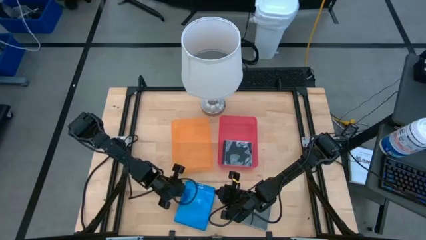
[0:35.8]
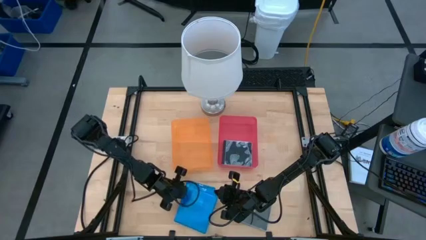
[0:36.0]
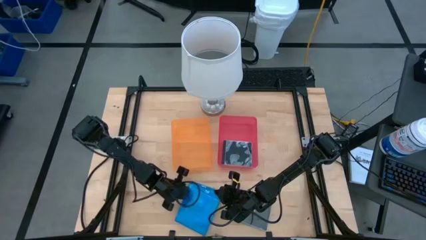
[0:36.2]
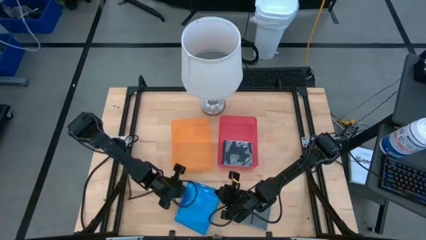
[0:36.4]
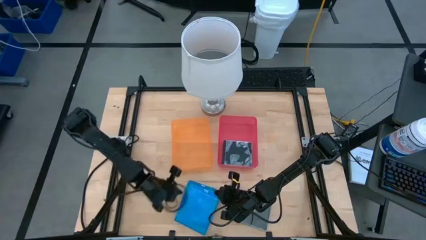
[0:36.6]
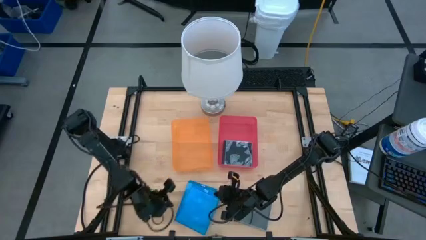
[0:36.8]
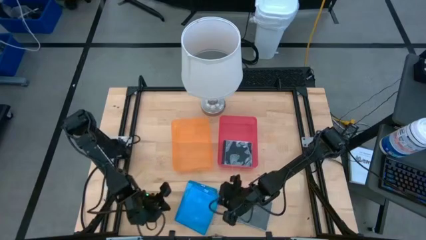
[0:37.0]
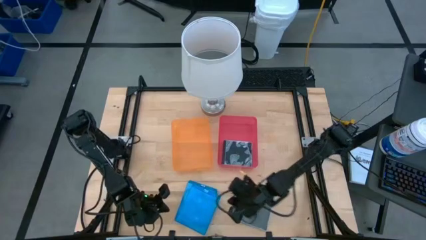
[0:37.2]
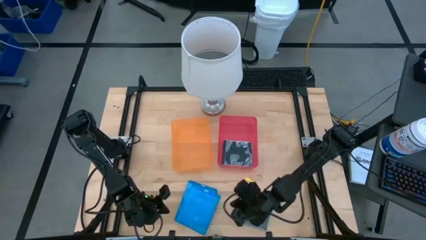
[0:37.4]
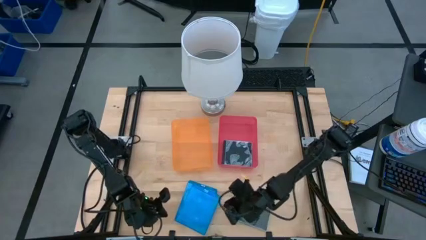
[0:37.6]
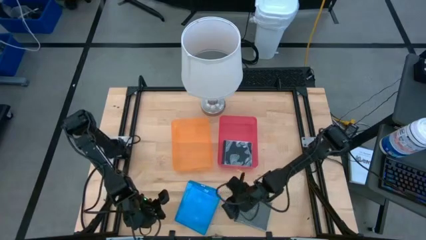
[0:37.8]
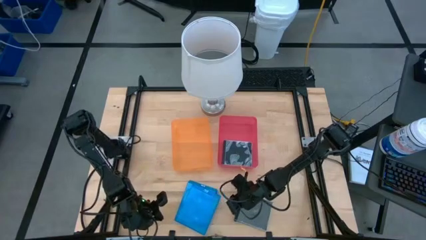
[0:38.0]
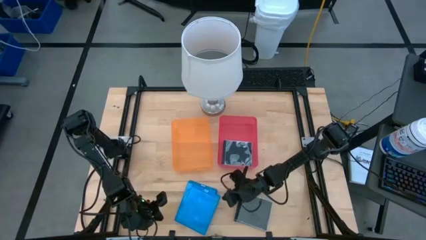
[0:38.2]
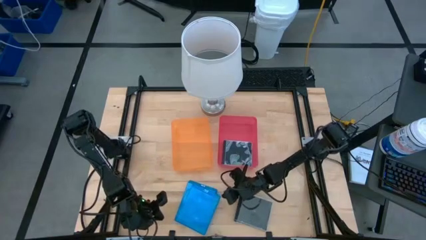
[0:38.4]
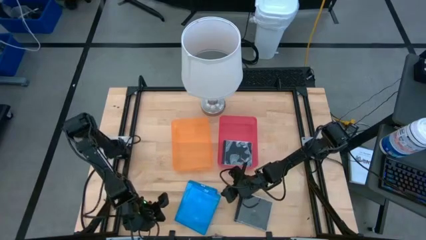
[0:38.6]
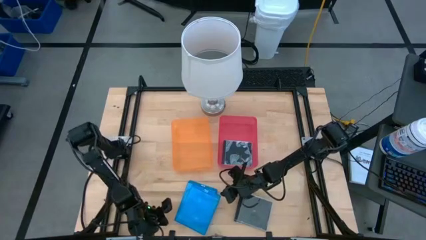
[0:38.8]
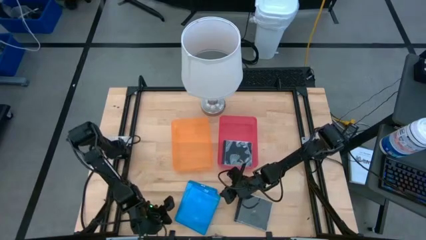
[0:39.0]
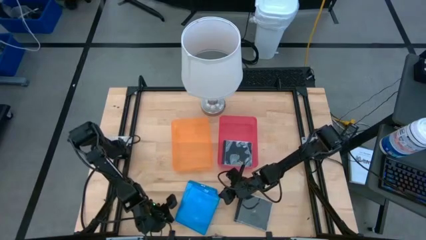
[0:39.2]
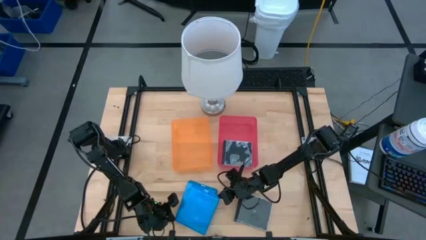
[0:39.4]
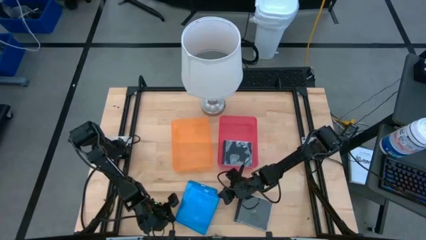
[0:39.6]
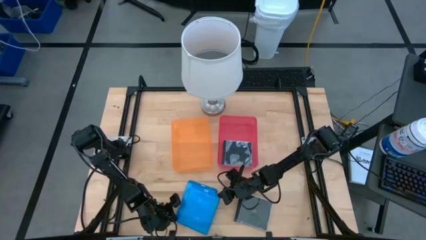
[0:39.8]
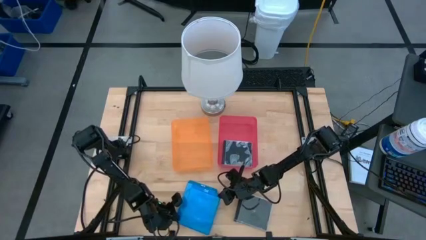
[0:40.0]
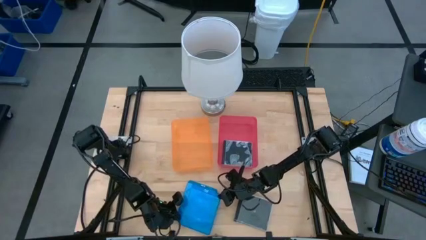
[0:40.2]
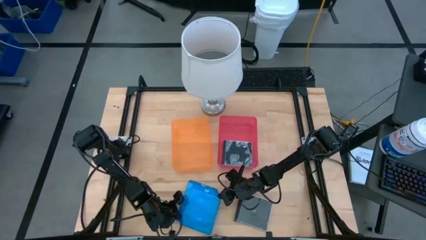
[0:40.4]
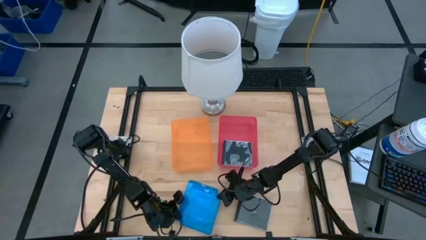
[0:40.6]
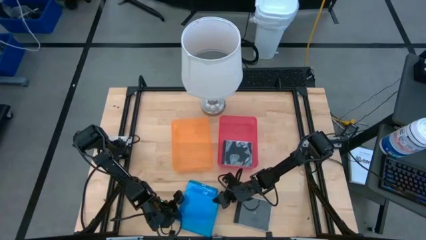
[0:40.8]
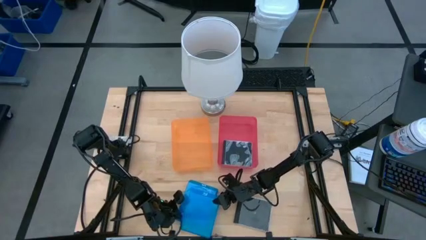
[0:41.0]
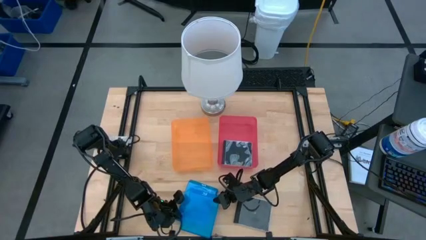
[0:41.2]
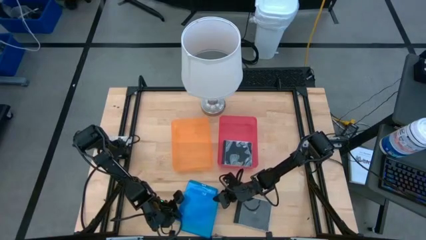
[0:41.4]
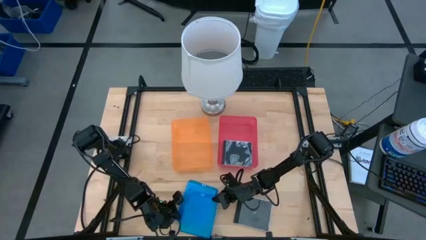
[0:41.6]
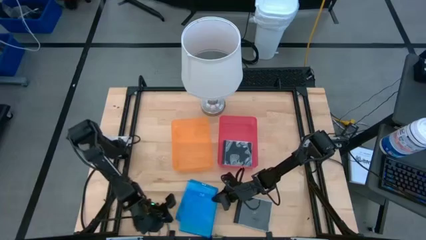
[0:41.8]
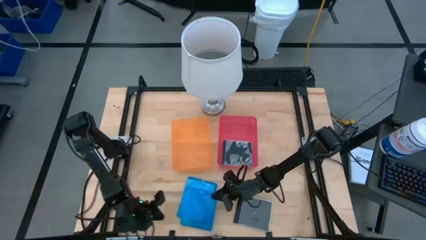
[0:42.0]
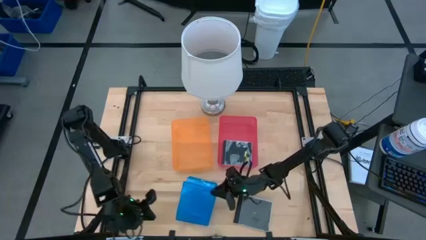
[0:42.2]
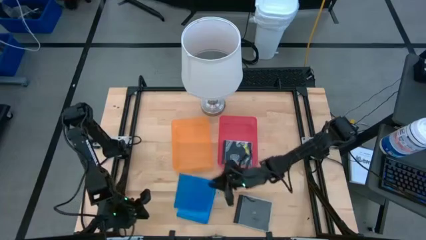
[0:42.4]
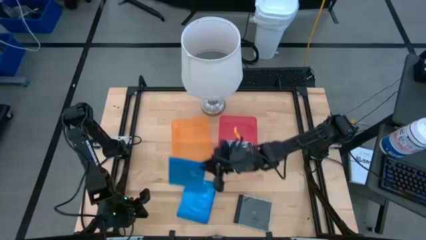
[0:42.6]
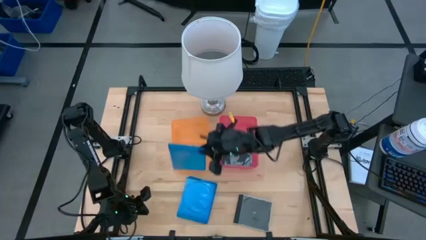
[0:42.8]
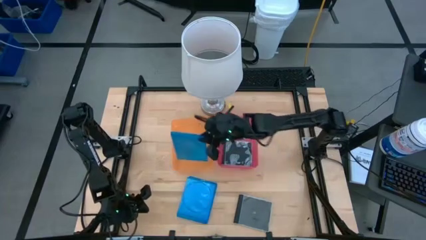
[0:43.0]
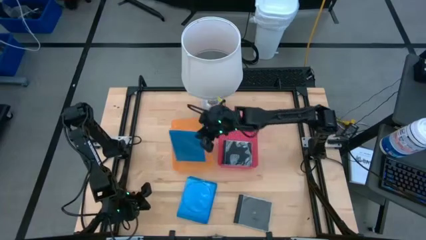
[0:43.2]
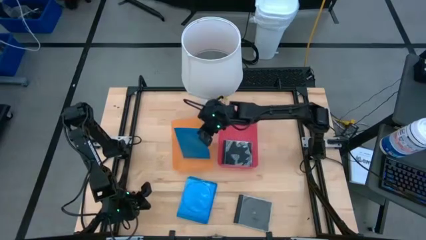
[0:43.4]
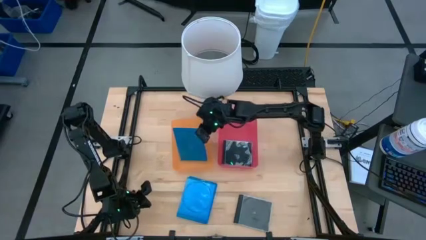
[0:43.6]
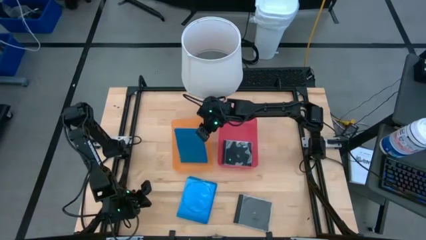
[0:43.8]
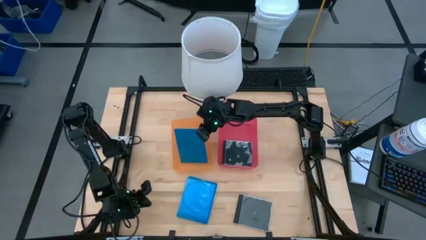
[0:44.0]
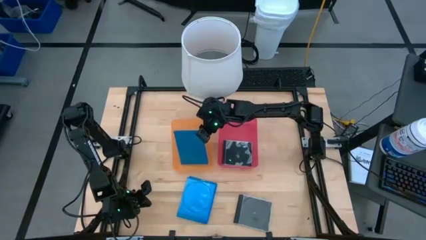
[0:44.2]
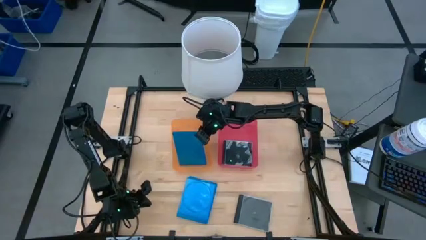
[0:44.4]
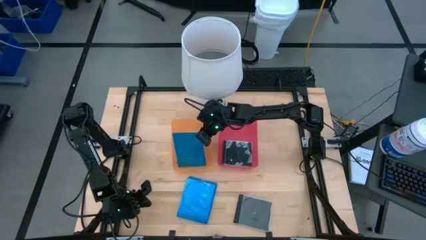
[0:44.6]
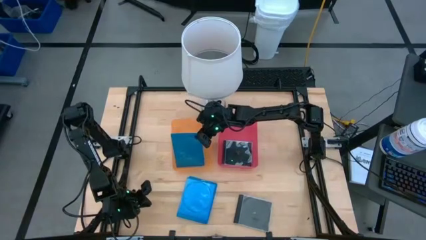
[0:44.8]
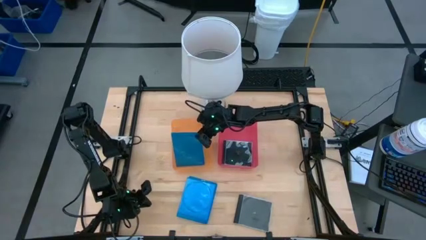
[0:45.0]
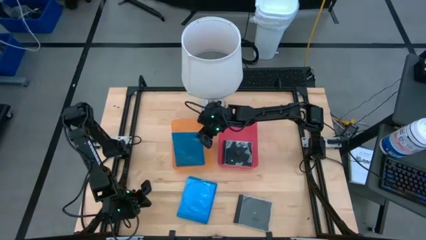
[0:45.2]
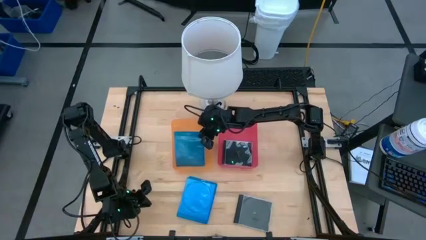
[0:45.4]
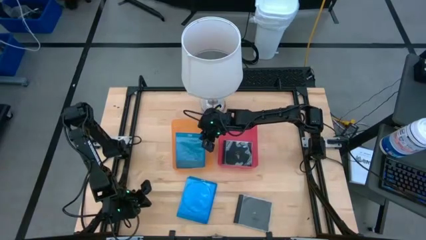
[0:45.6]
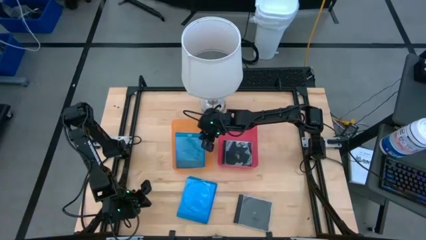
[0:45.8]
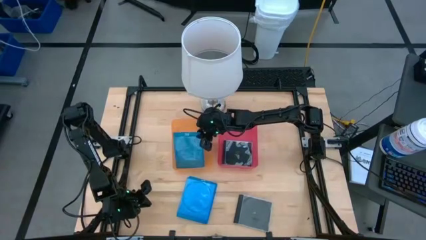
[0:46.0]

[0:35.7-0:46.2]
Task: Pick & place jewel cases by type
Put the blue CD case into the orange bin
